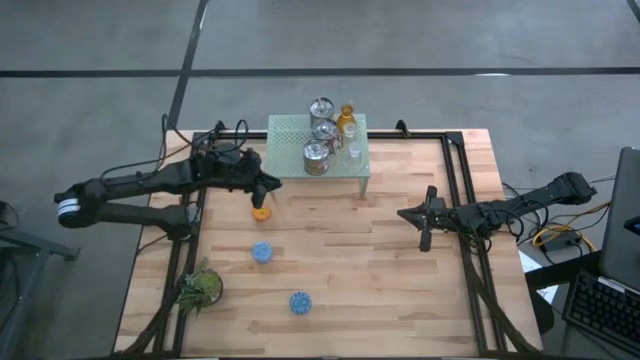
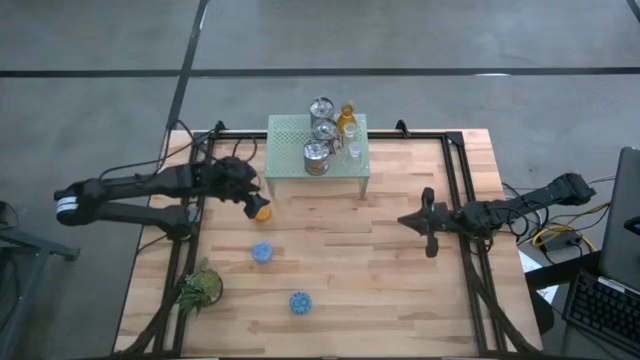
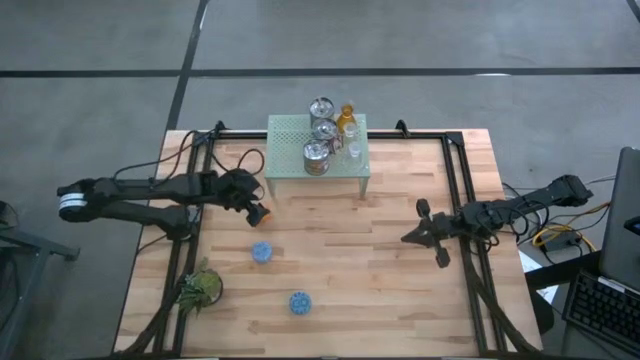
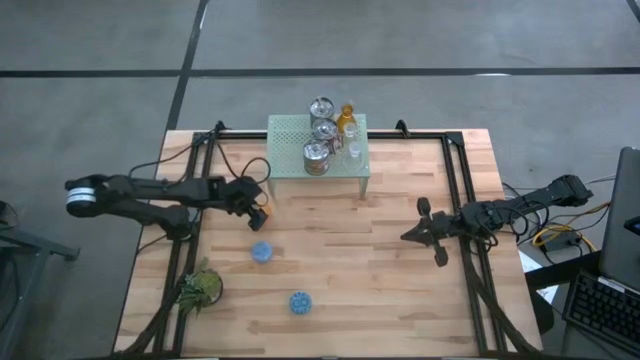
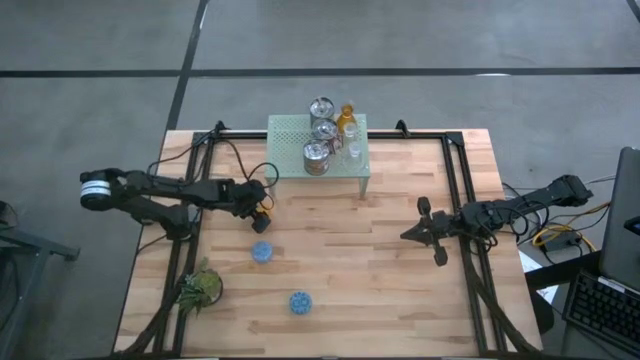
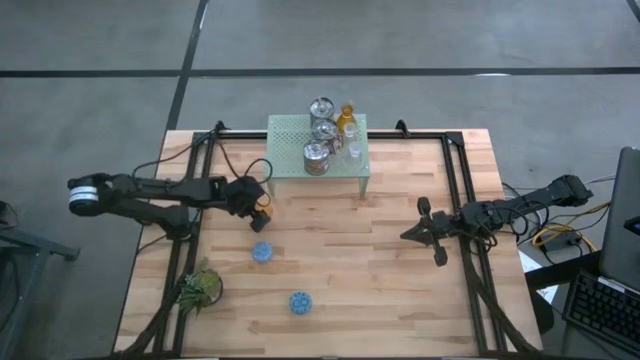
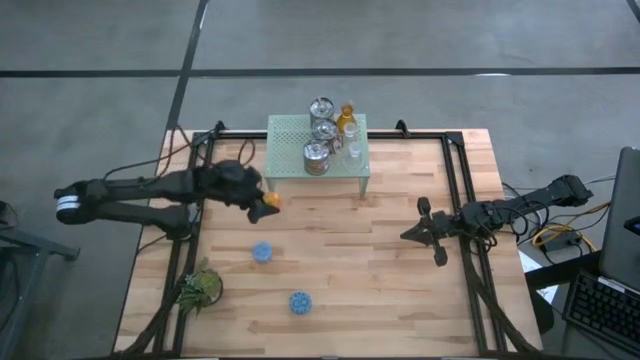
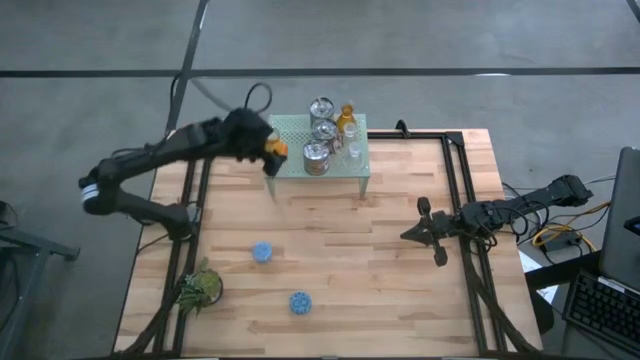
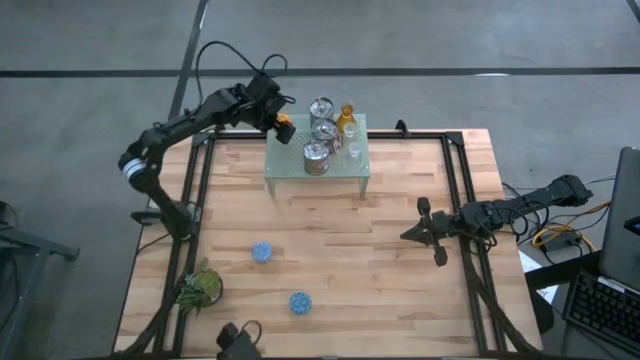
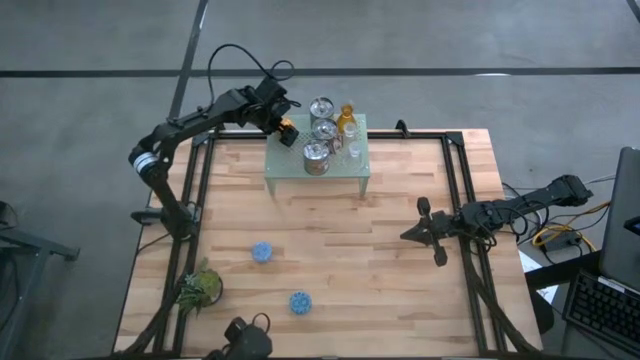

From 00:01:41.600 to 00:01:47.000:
Task: Pick & Place candle stick holders
Put the orange scented candle on the shelf

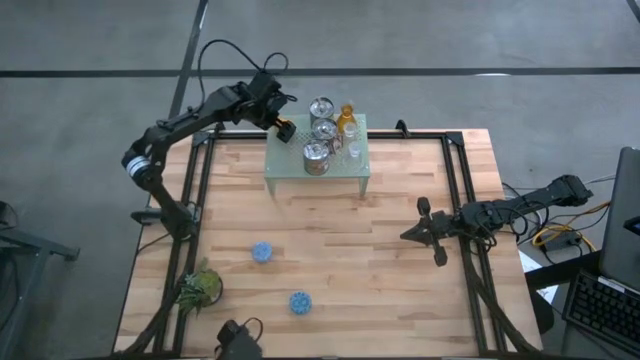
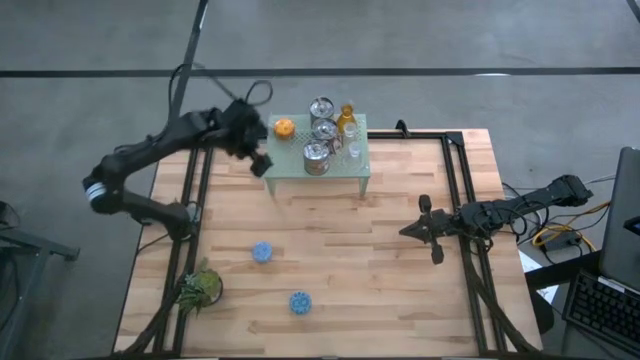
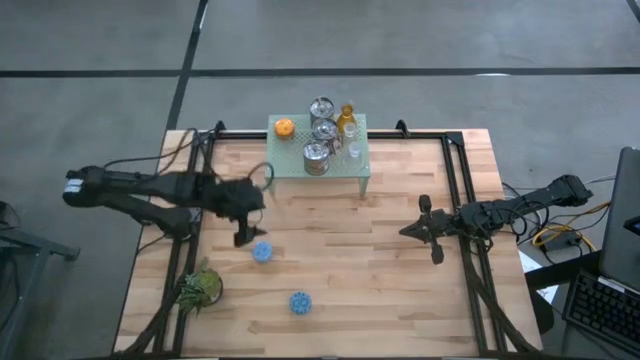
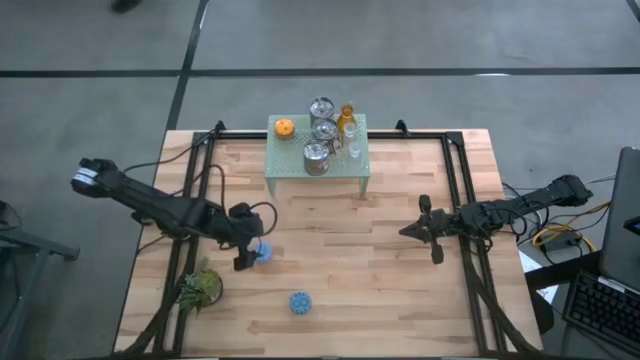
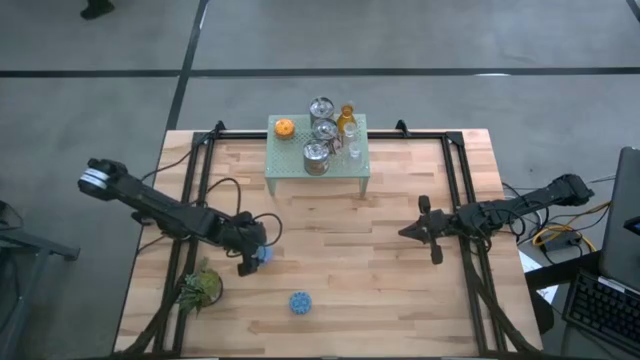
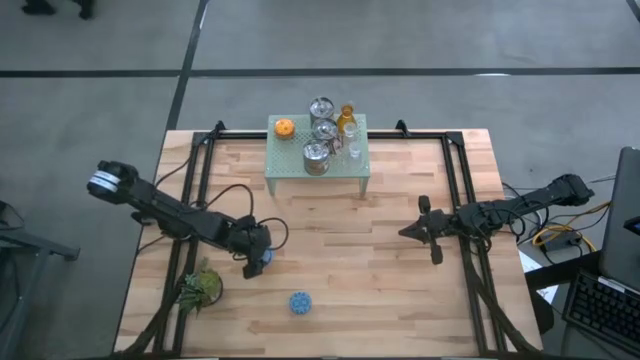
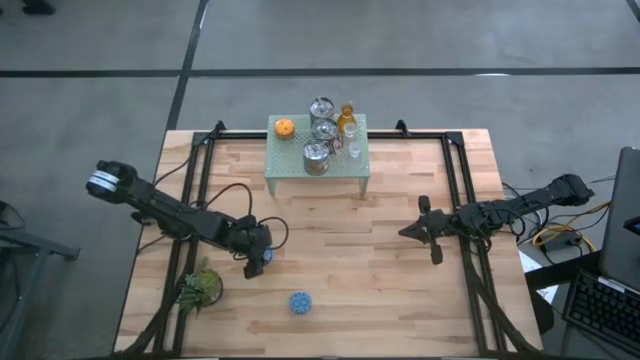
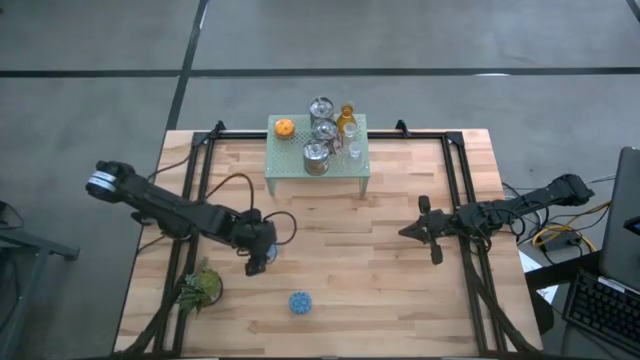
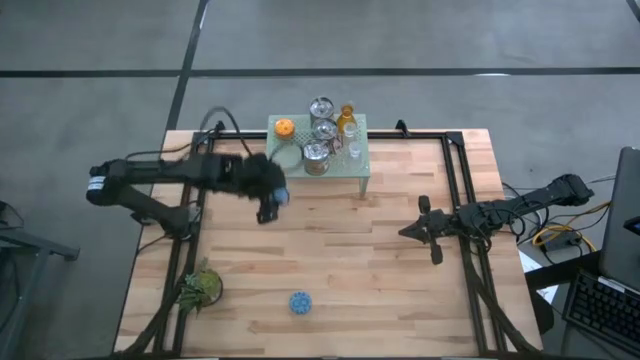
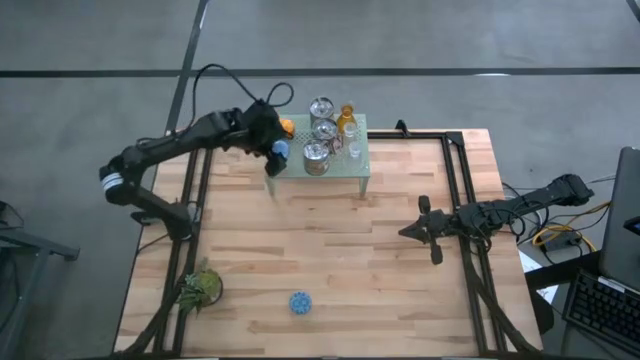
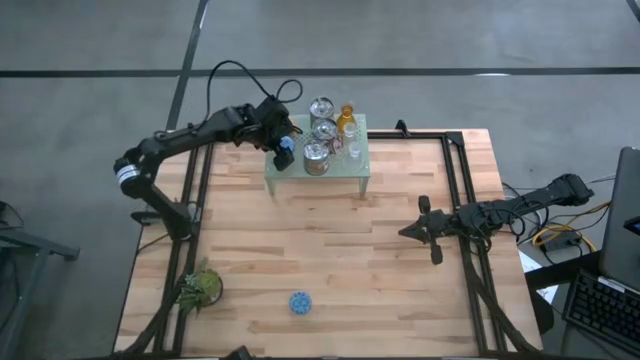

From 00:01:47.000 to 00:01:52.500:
Put the light blue scented candle on the shelf

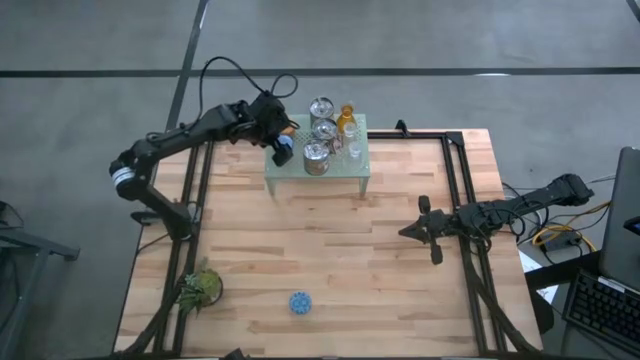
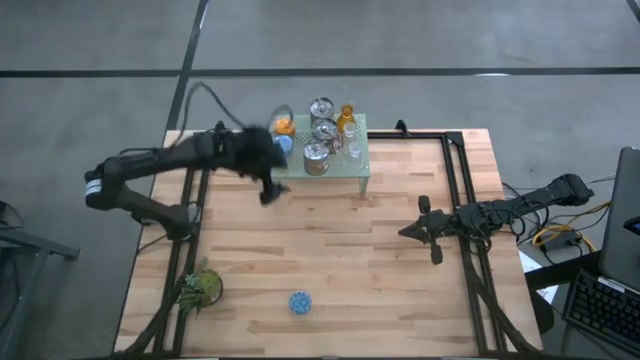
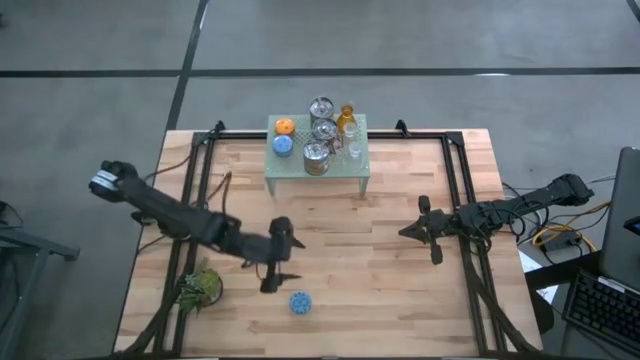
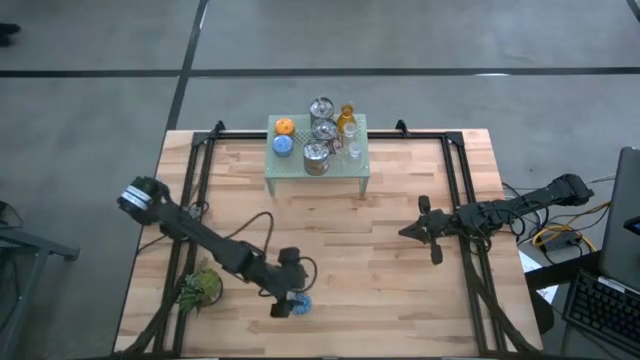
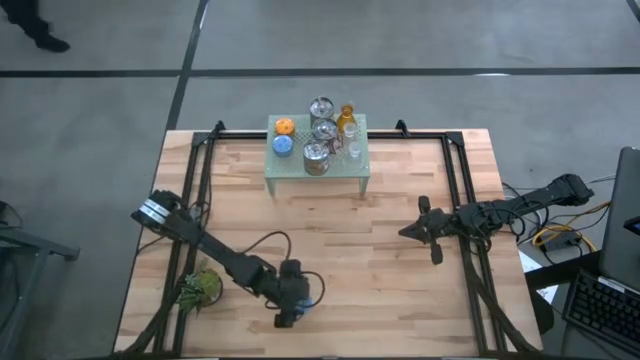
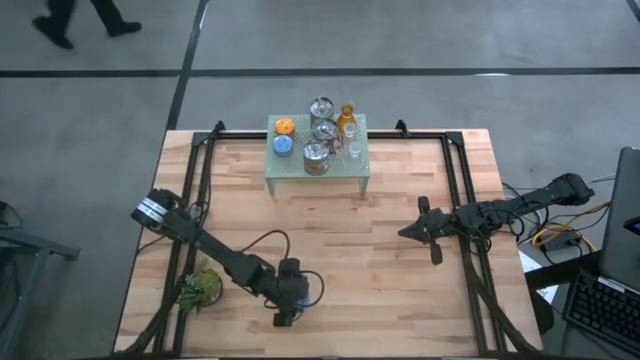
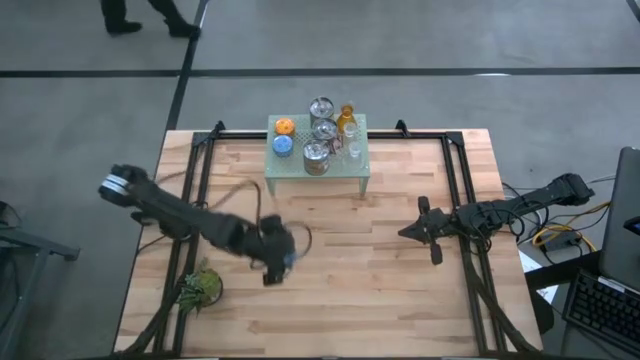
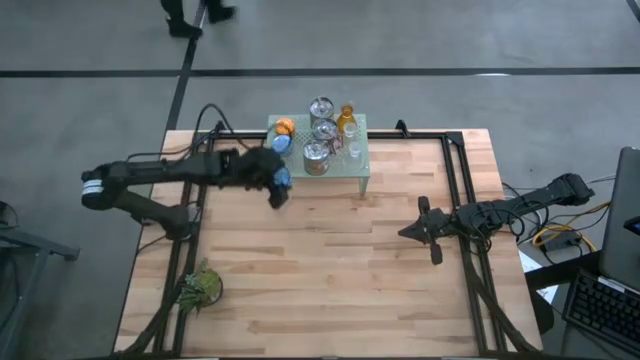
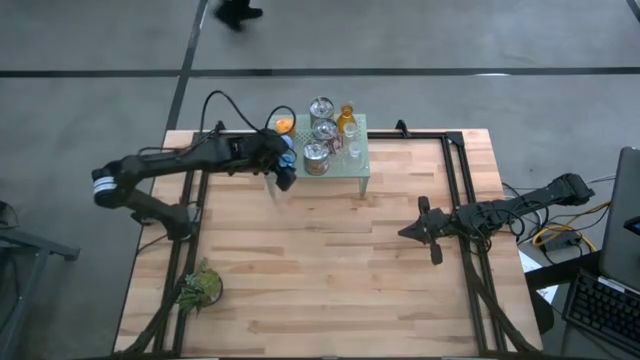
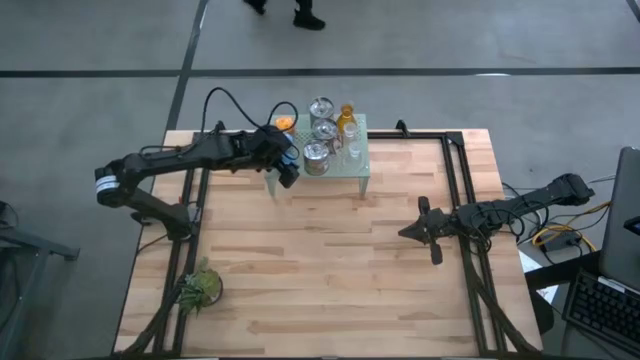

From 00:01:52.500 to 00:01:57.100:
Put the blue scented candle on the shelf

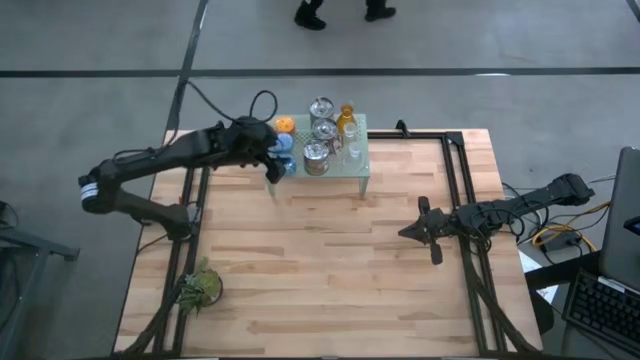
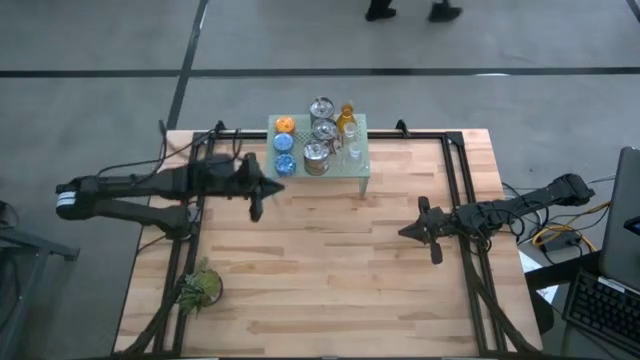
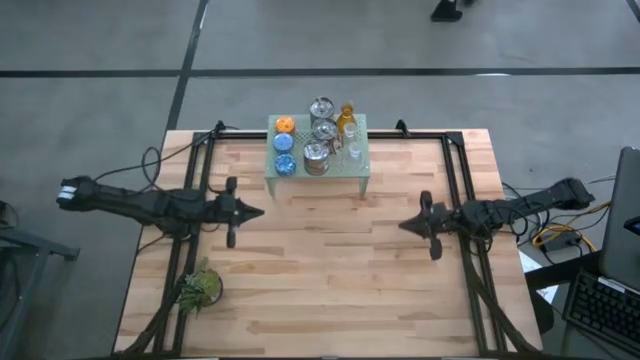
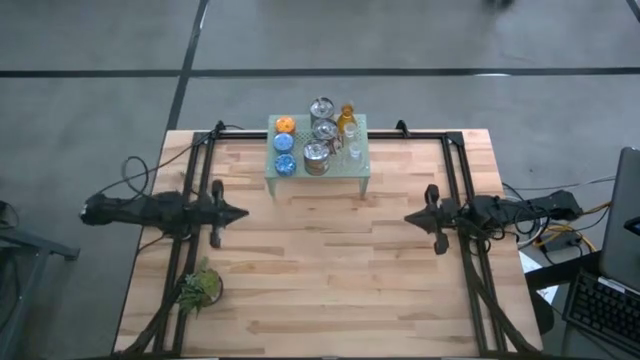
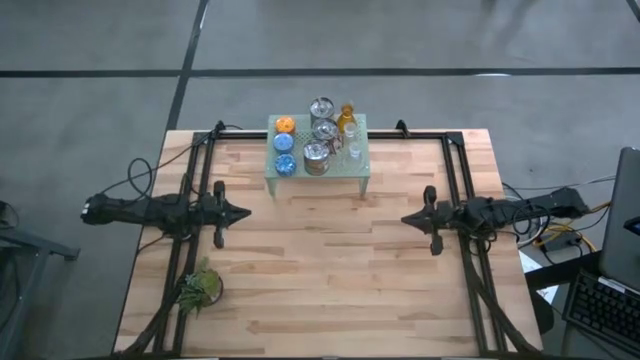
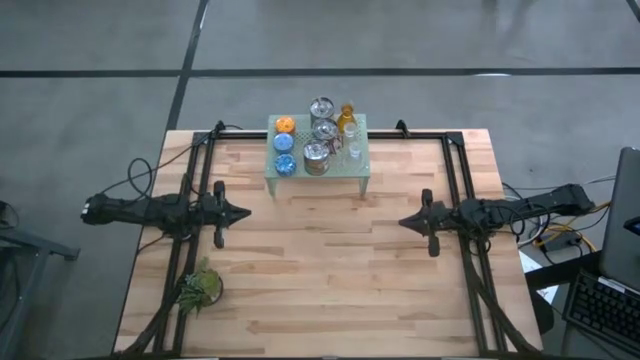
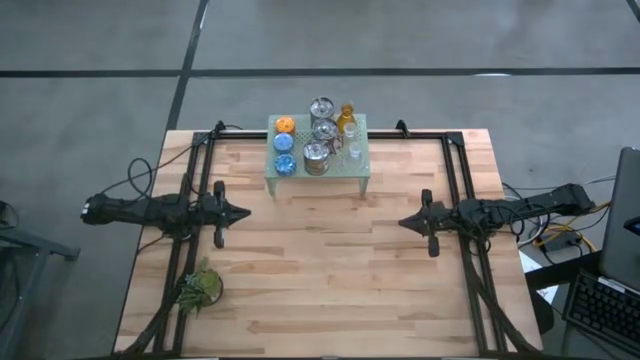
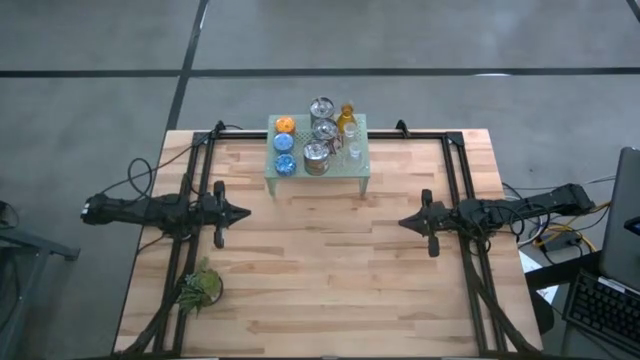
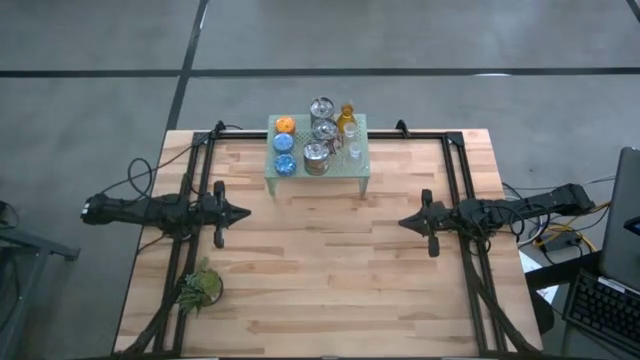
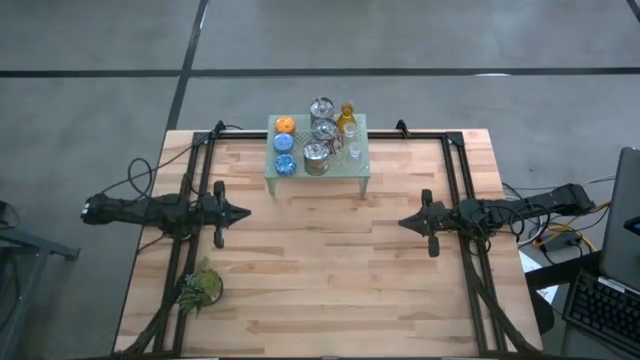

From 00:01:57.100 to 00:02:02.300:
Return to Home Position
